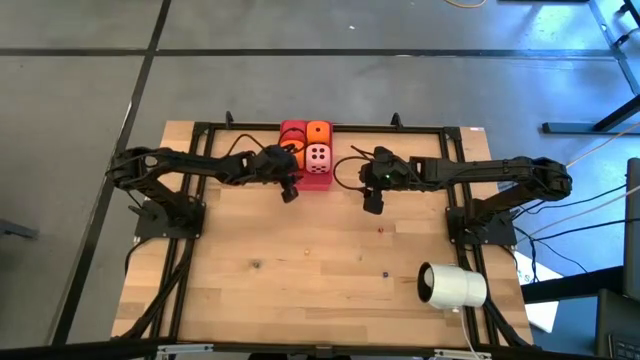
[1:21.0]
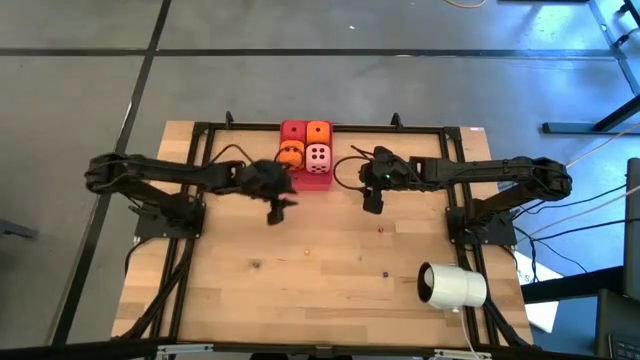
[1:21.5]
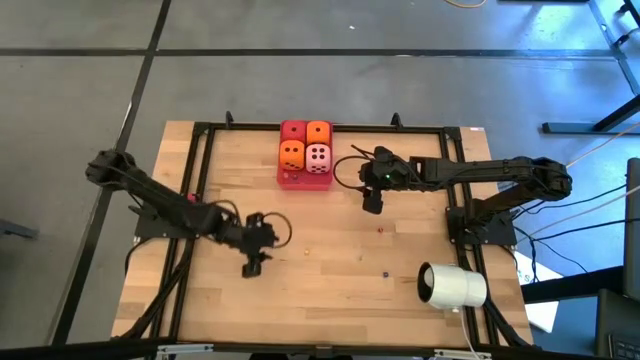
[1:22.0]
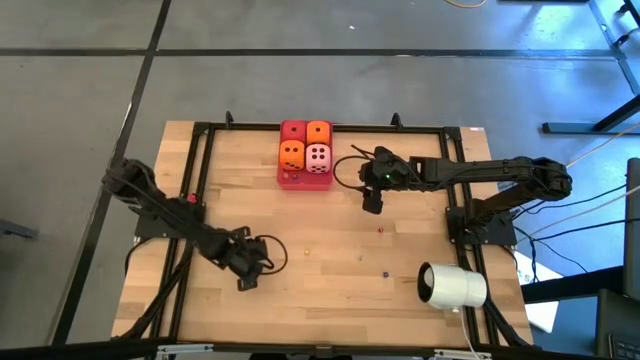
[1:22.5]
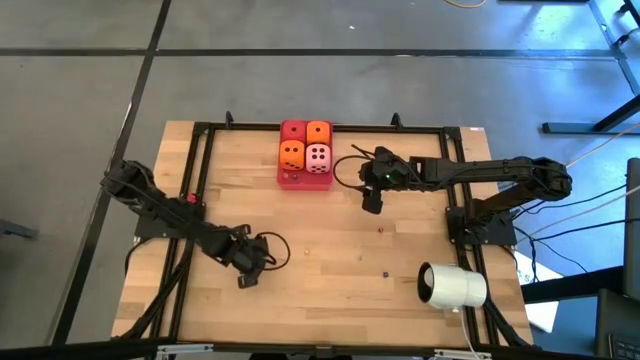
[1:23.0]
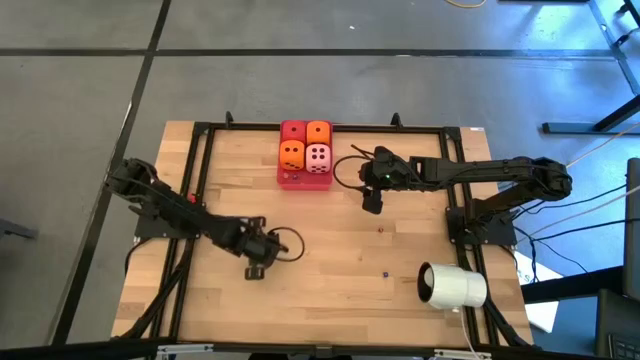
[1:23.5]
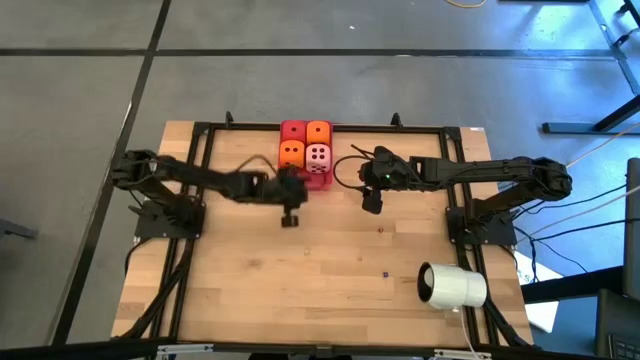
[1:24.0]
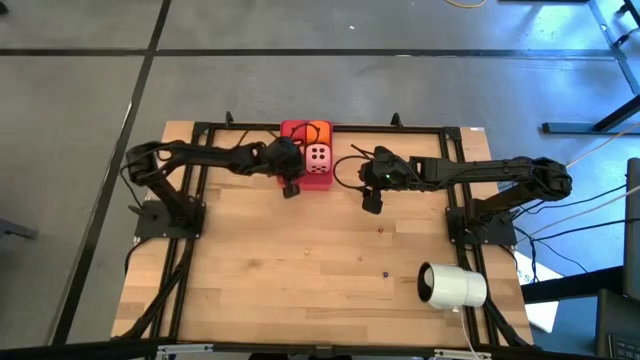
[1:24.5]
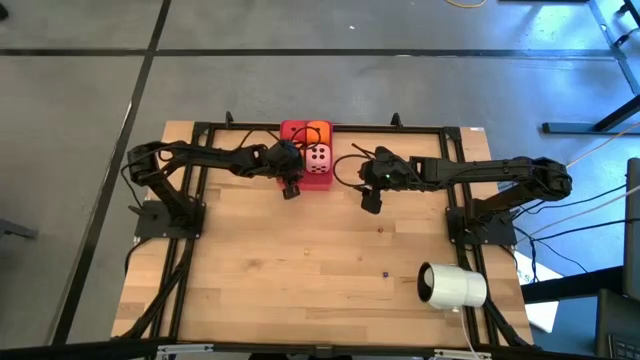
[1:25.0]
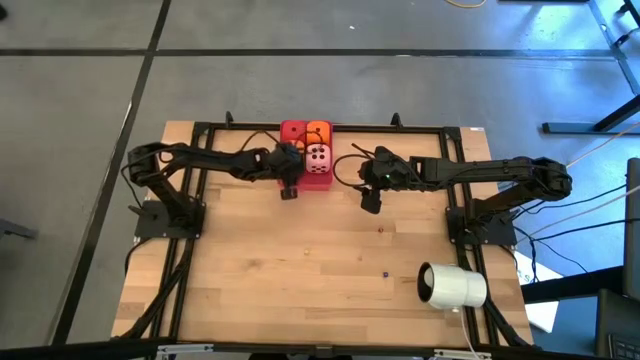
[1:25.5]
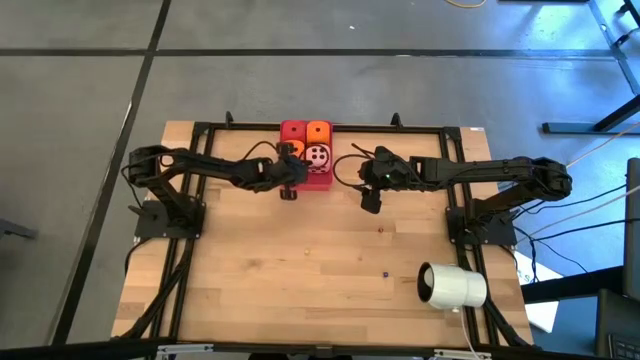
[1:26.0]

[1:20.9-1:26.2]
Task: Pick & Place Dice
Put the small green dice into the bin

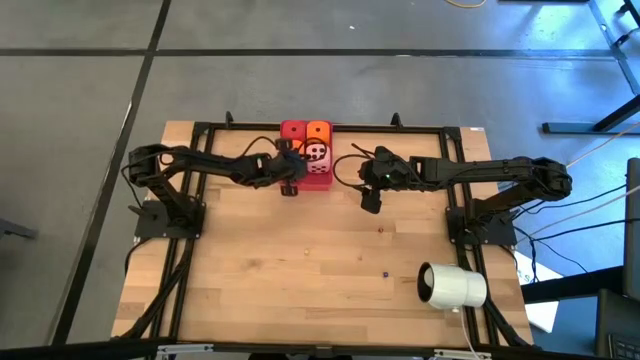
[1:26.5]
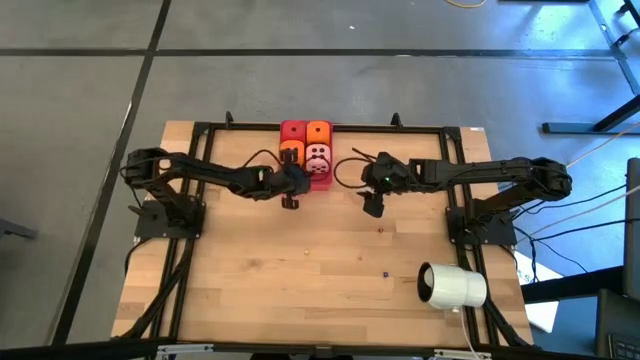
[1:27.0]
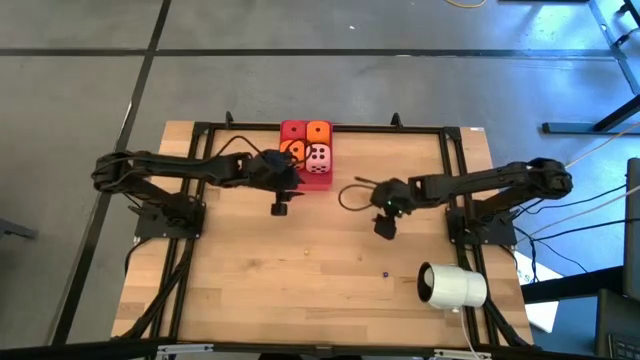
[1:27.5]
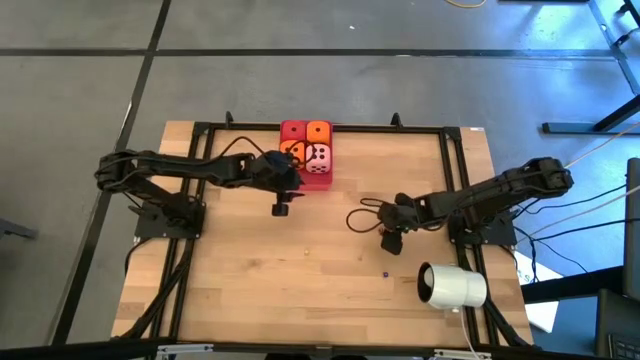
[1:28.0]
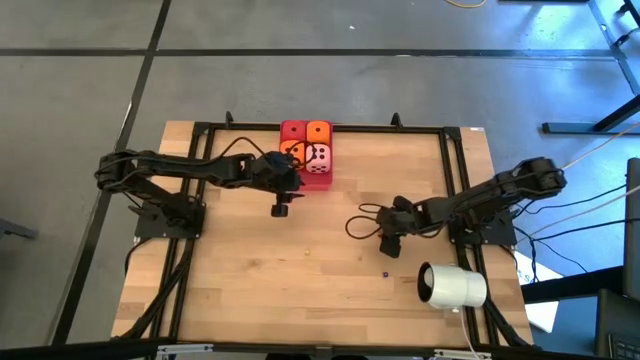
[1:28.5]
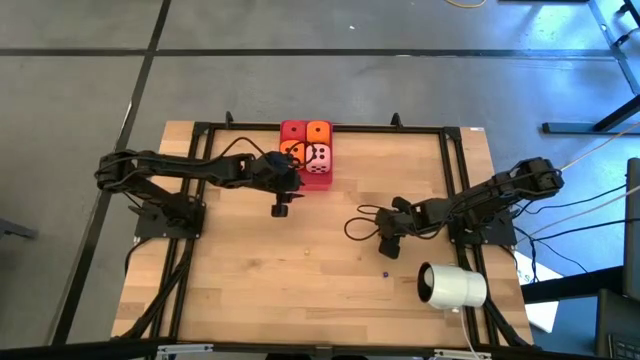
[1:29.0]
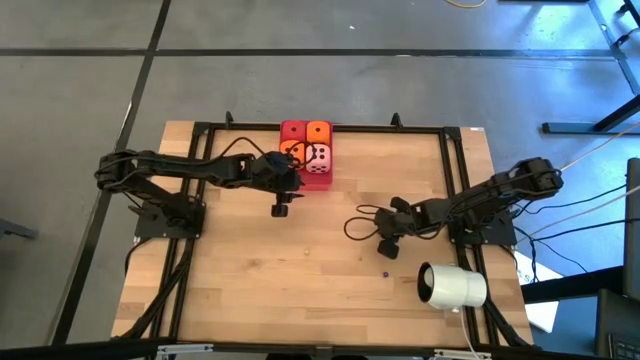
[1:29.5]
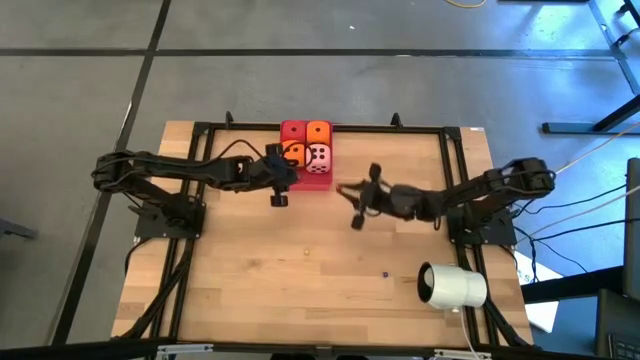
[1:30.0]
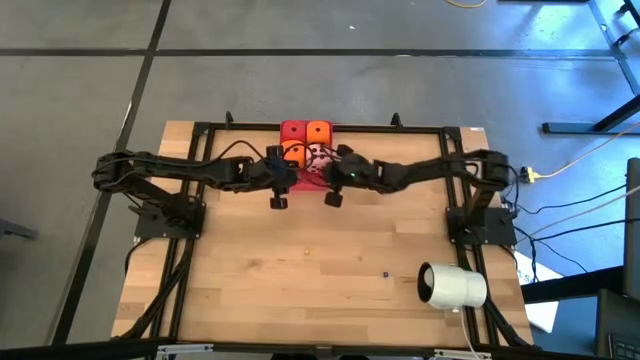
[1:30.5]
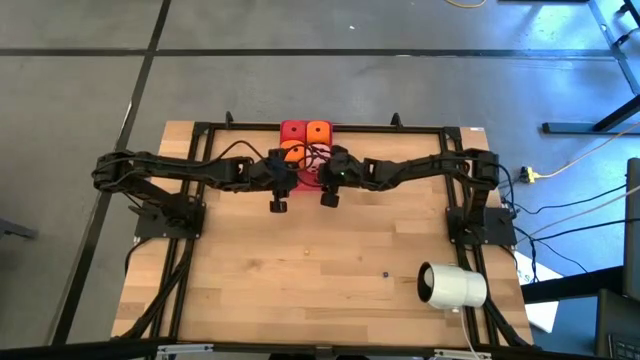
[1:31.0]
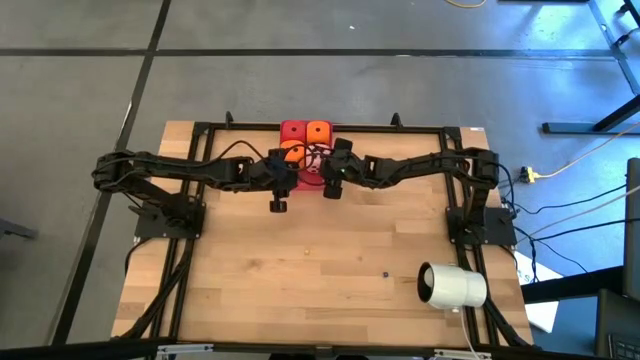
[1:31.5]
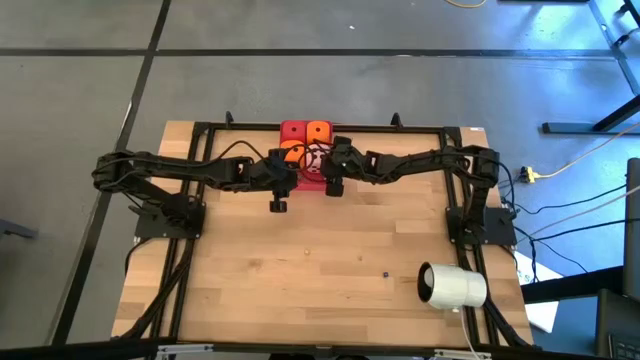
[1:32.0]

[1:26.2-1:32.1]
Put the small red dice into the bin

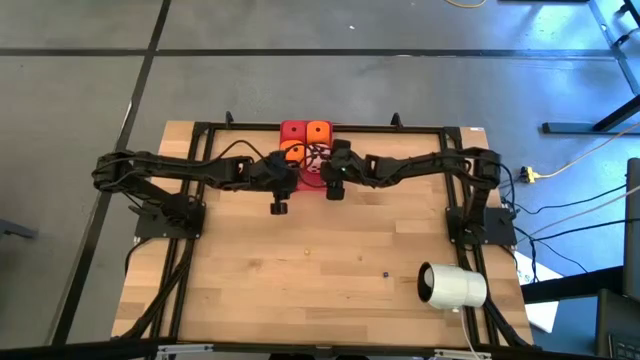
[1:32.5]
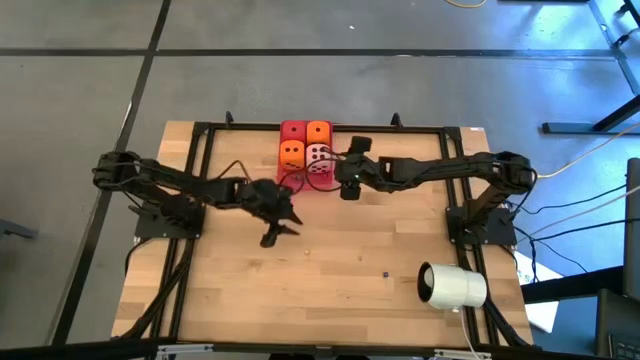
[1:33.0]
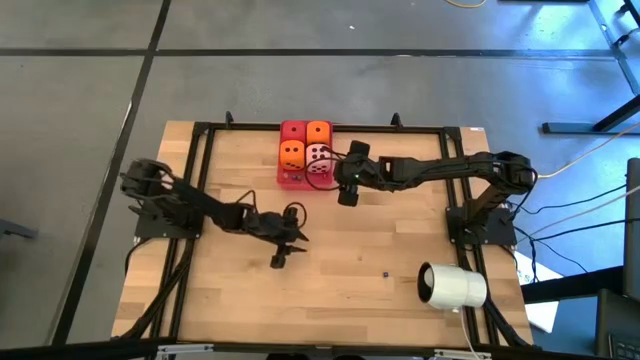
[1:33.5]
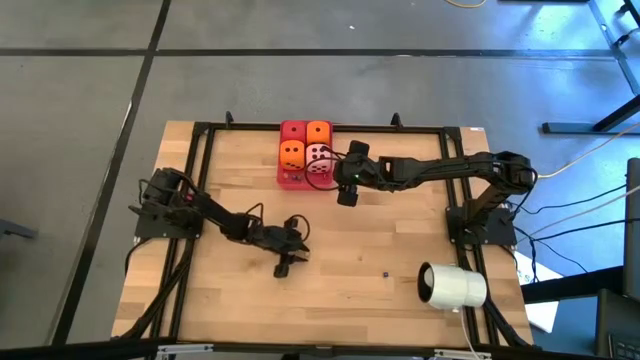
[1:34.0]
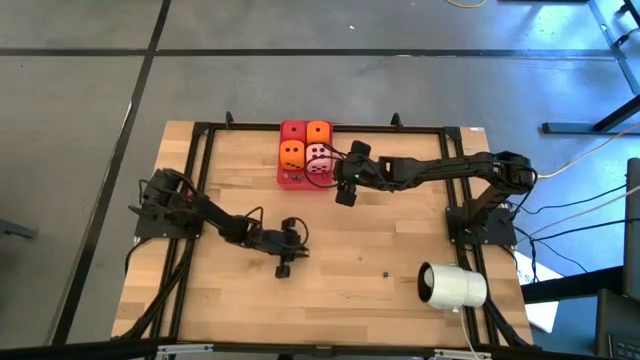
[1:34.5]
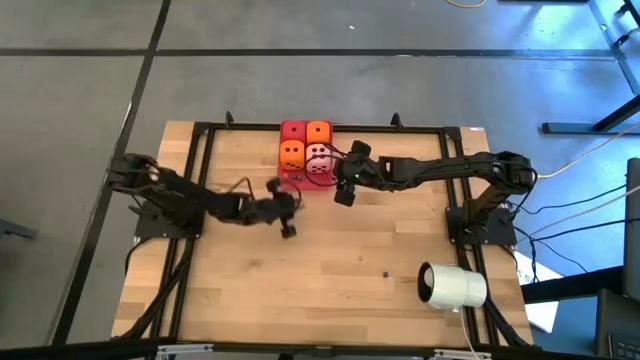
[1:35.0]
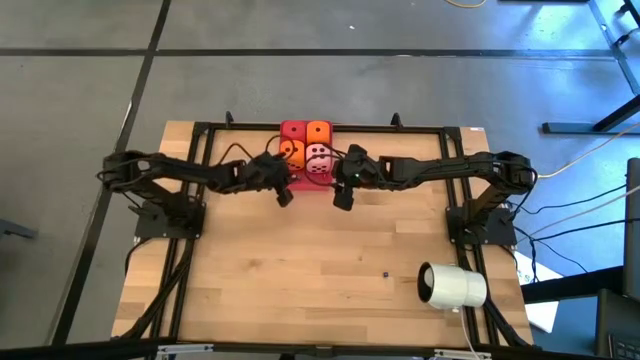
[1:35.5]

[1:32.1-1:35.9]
Put the small yellow dice into the bin

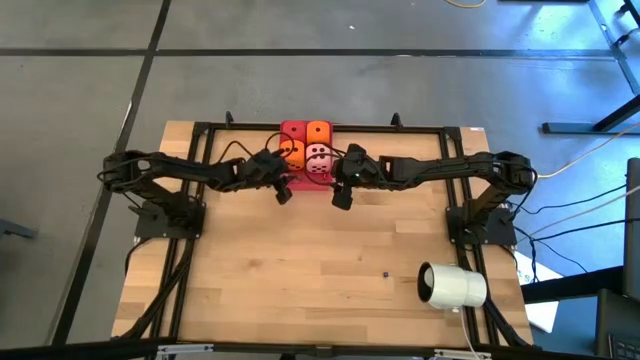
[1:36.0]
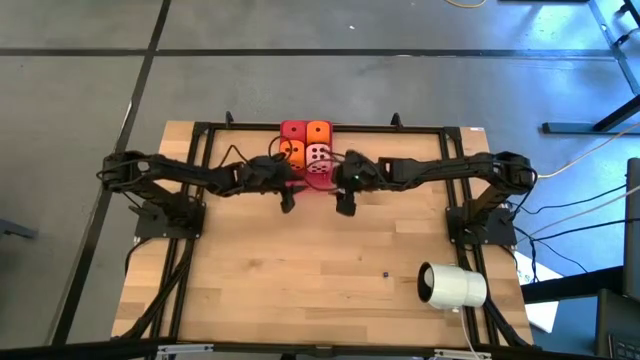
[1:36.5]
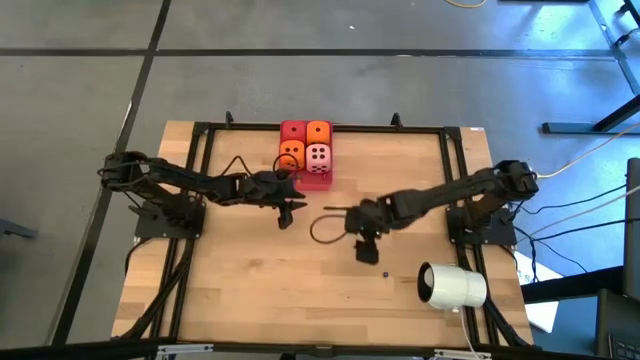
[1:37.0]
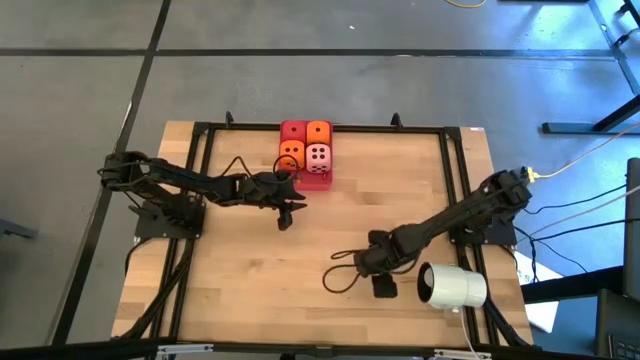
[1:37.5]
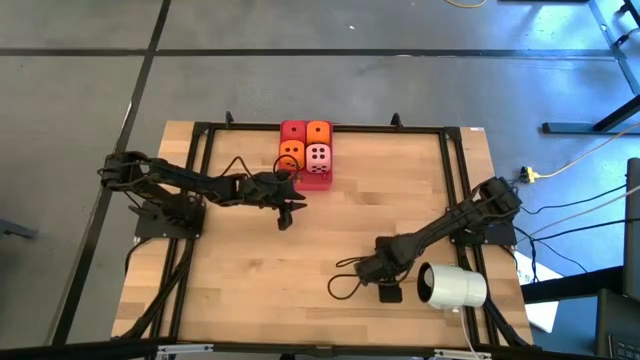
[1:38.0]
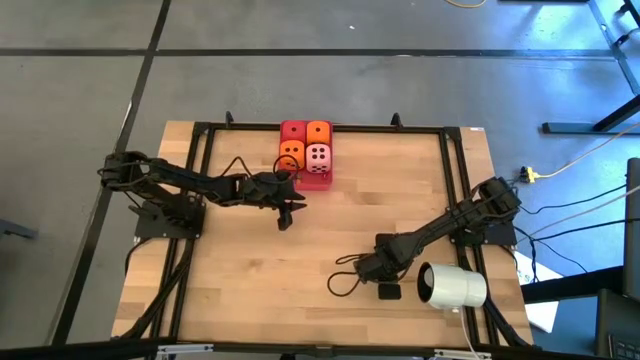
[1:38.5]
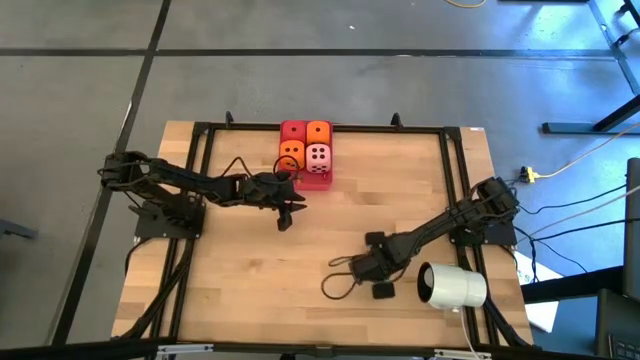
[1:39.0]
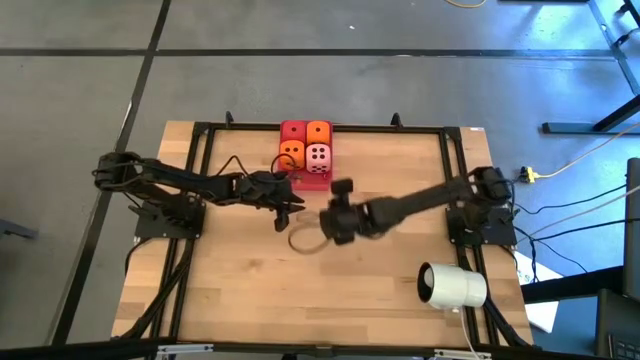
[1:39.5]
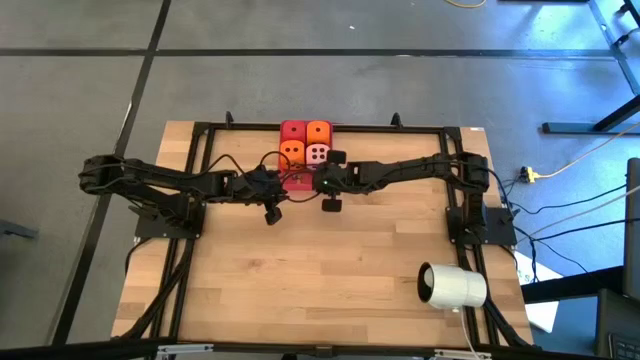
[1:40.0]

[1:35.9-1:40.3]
Put the small blue dice into the bin

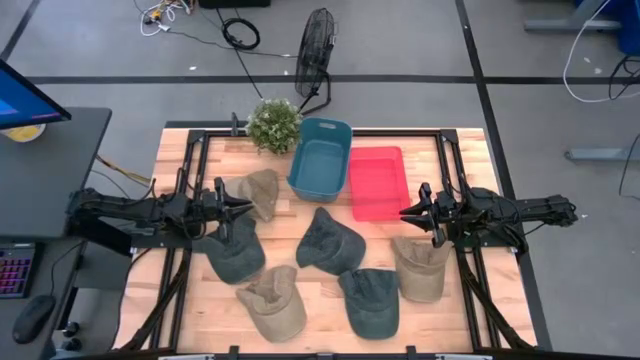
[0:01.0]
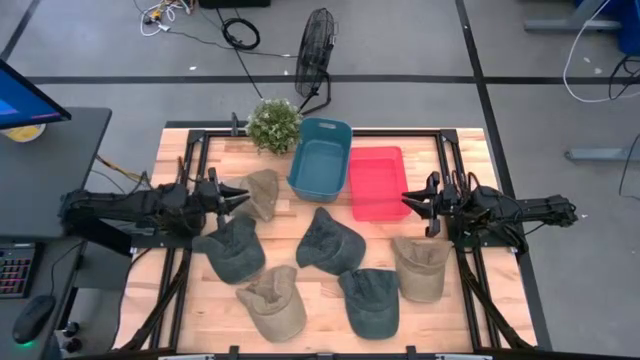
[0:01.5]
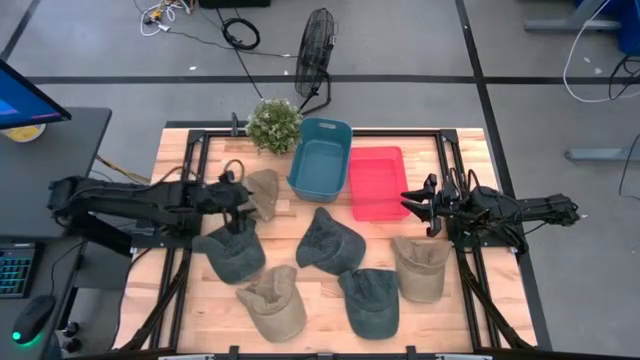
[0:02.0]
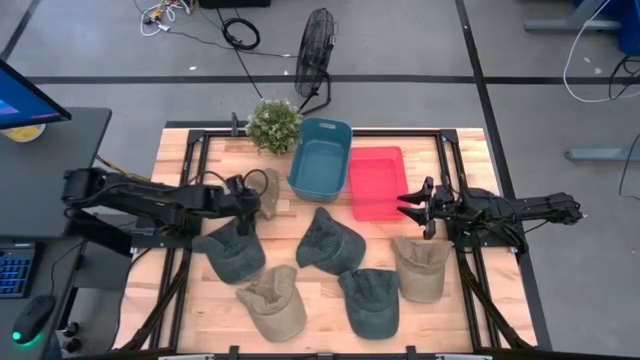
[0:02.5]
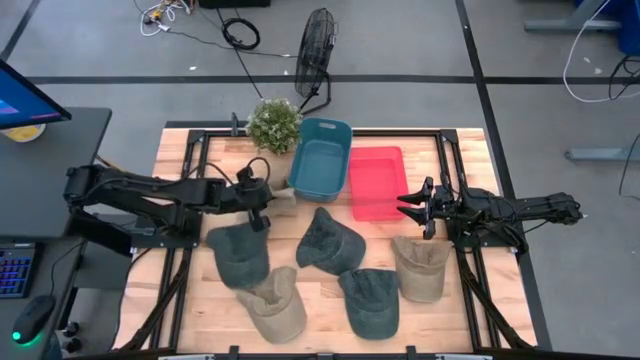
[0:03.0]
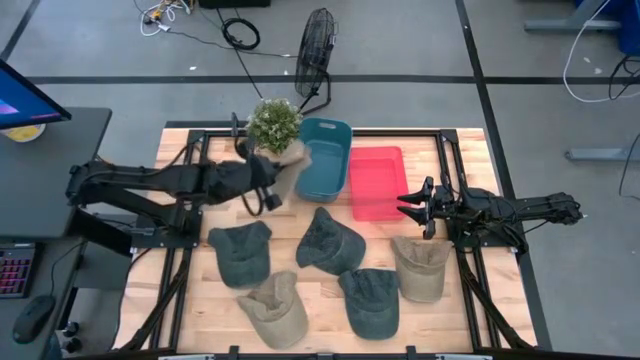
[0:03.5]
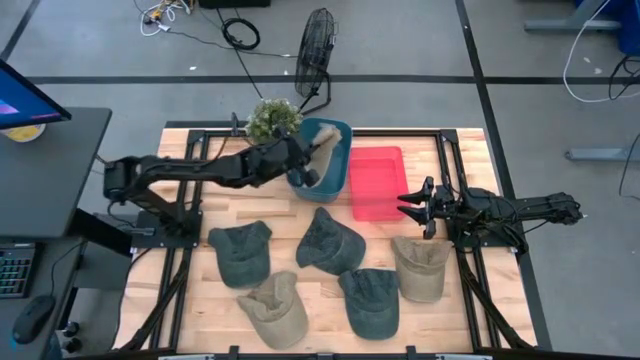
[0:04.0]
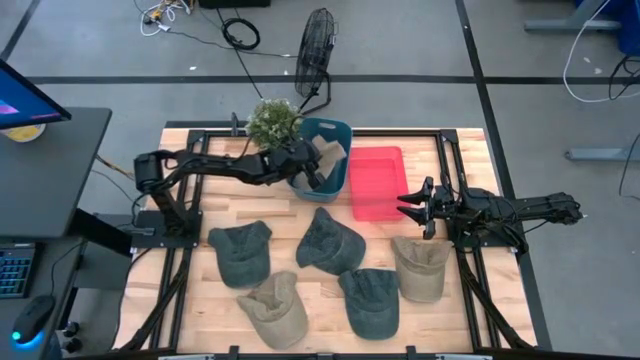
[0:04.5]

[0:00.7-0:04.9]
Task: Pick & Place hat
Put the top brown cap into the blue bin
